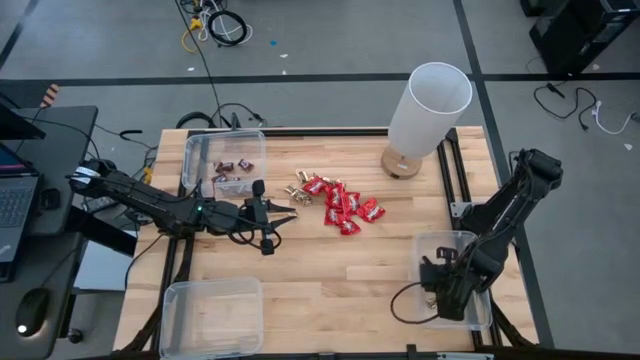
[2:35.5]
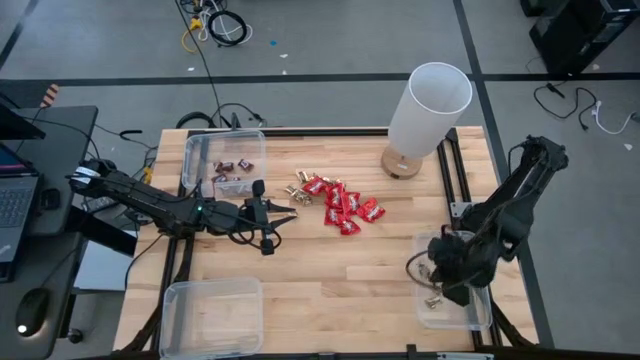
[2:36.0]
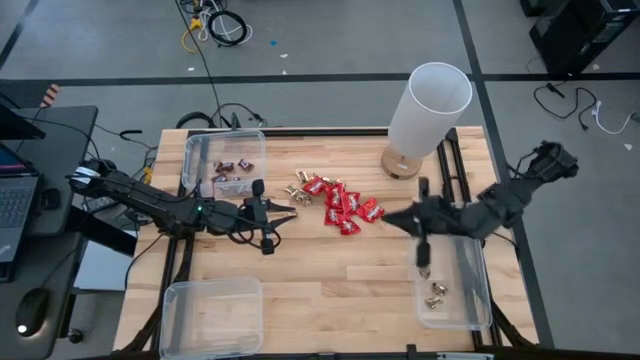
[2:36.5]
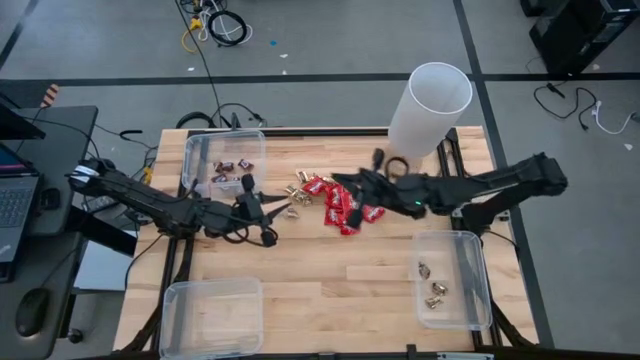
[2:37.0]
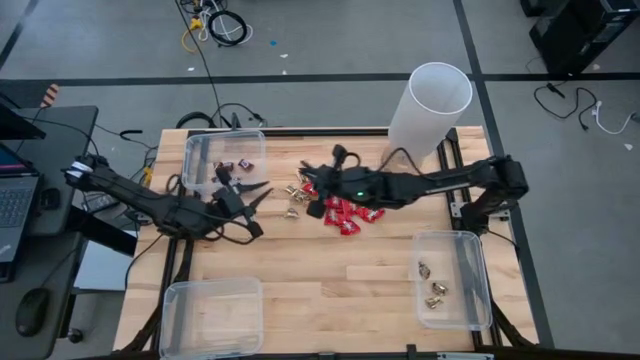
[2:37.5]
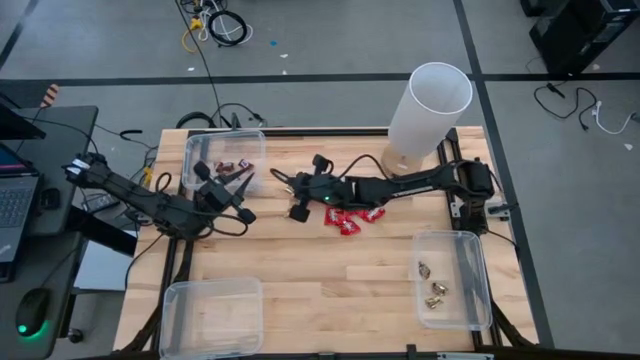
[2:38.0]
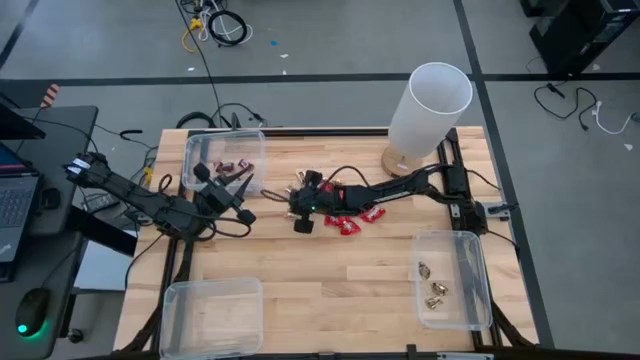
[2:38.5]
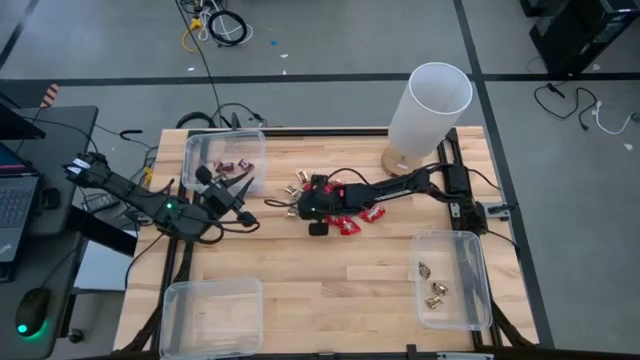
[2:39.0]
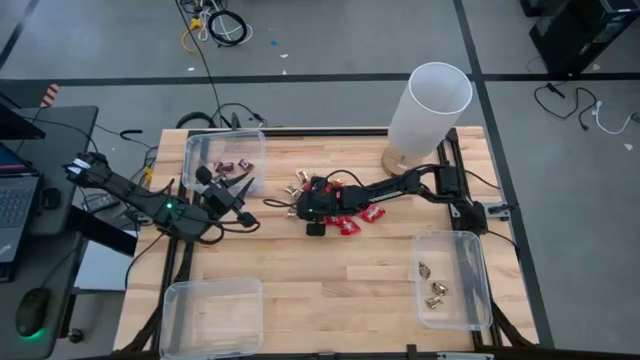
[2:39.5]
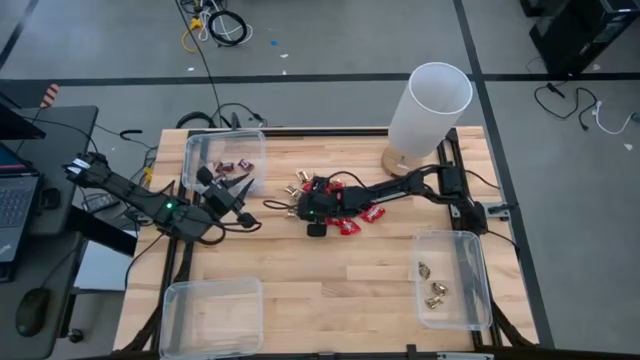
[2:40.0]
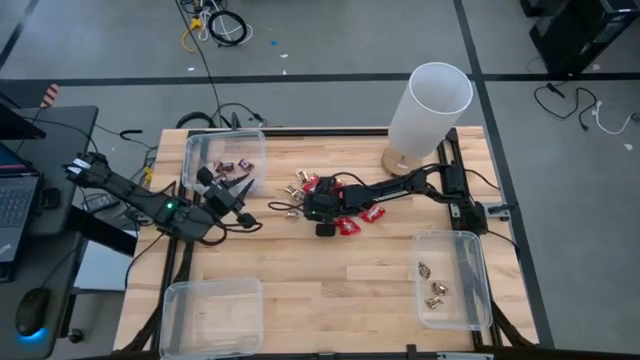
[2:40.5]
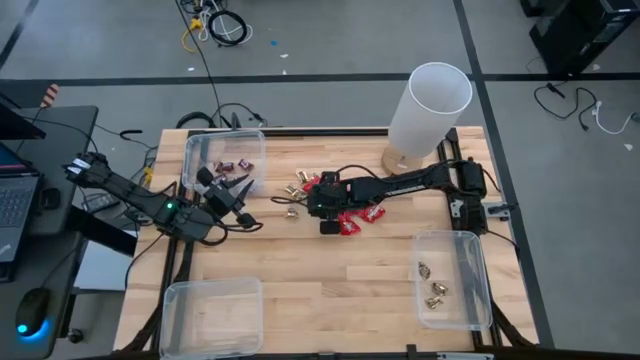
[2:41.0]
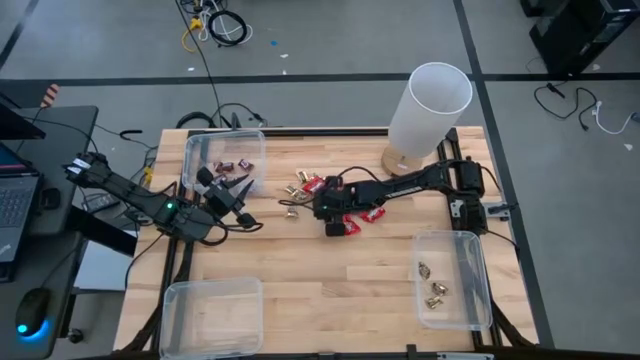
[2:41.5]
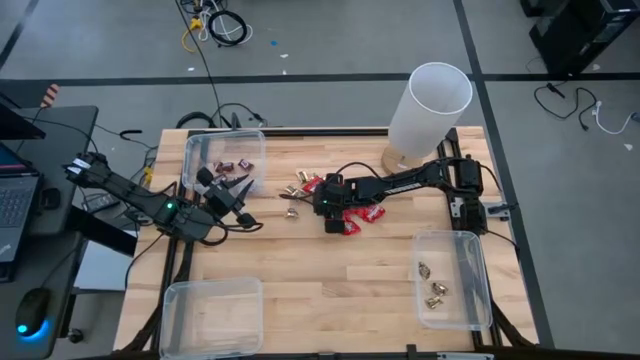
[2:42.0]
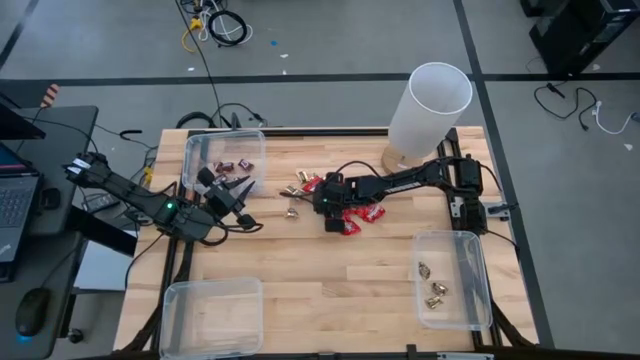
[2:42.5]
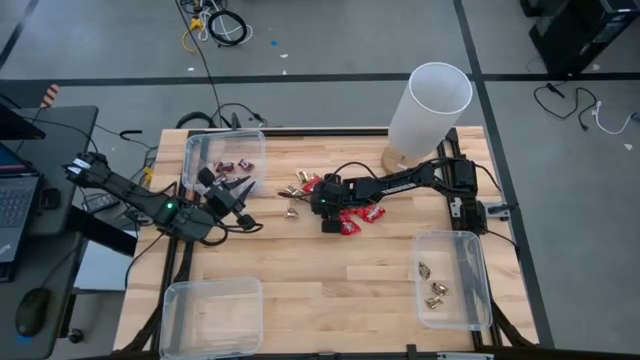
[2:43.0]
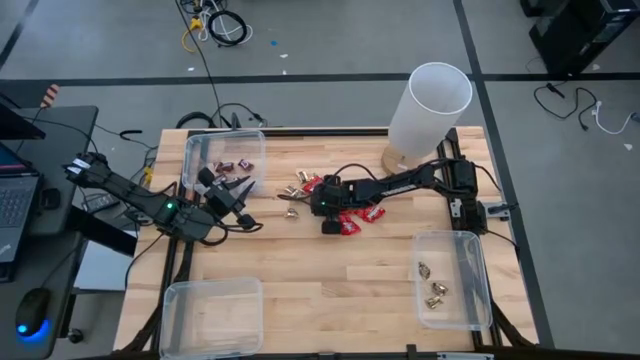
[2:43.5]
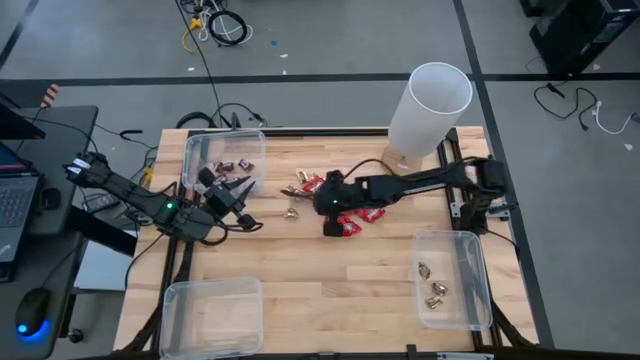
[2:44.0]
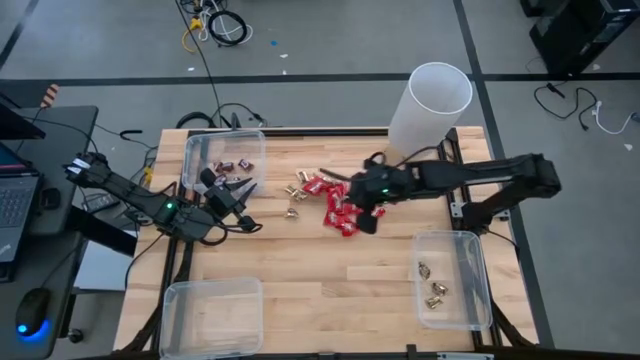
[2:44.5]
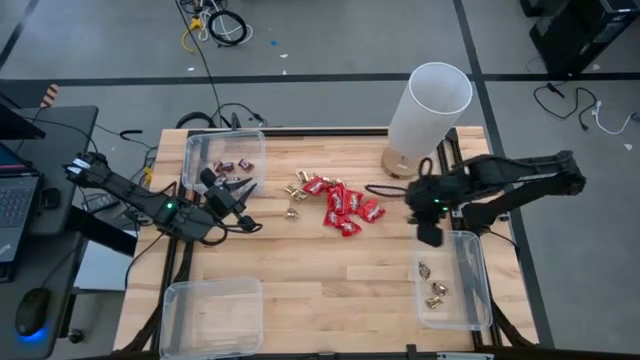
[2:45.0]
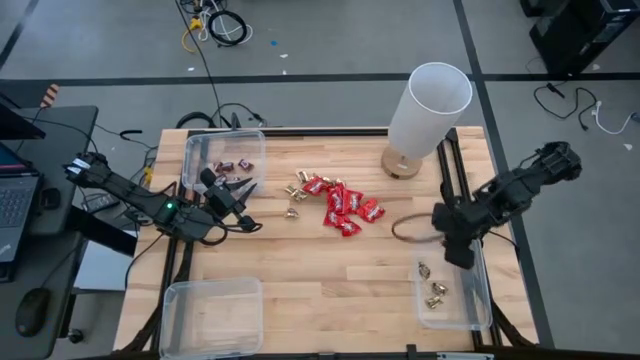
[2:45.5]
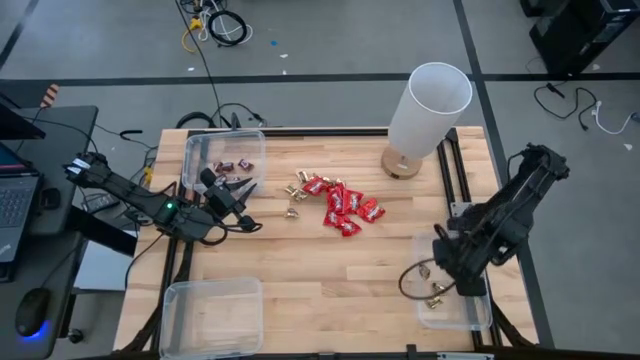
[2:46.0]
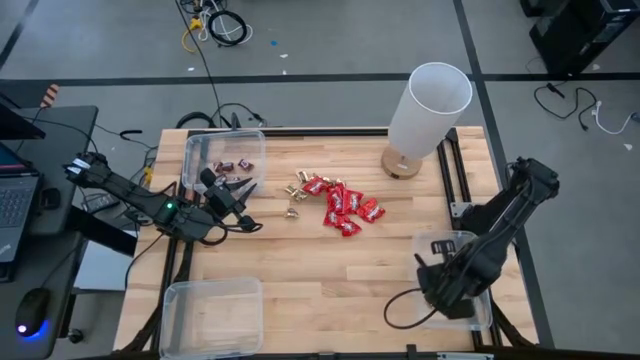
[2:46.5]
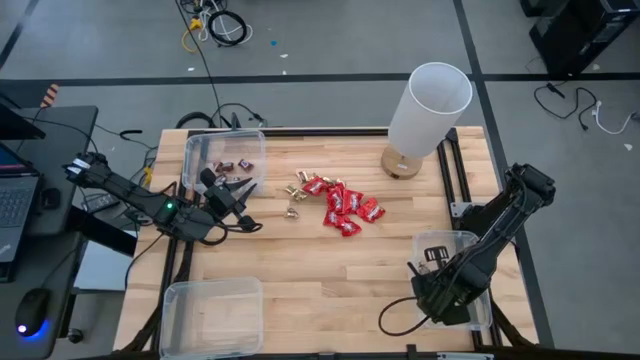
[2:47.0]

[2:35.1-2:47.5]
Task: Sort candy
Put the gold chocolate into the bottom right transparent bin

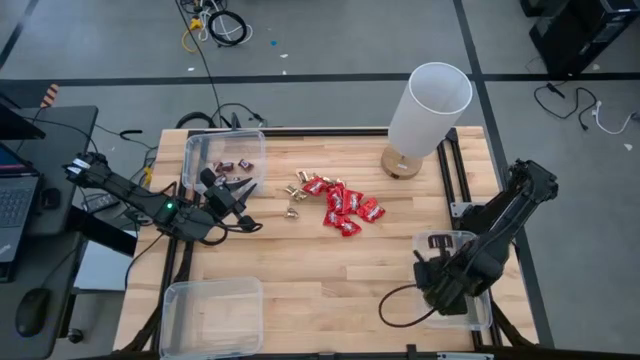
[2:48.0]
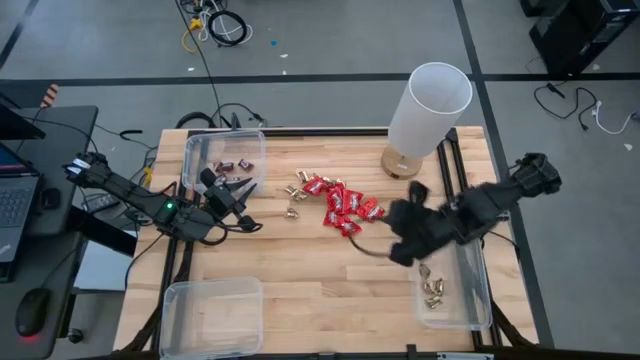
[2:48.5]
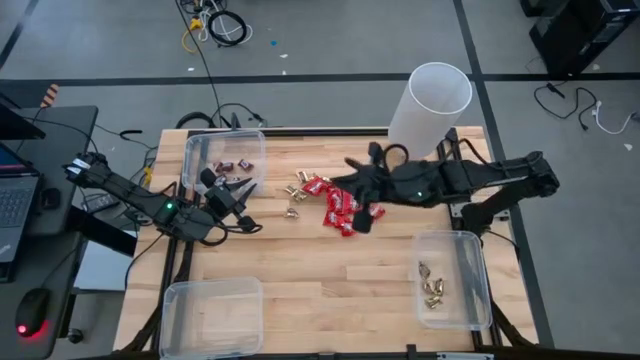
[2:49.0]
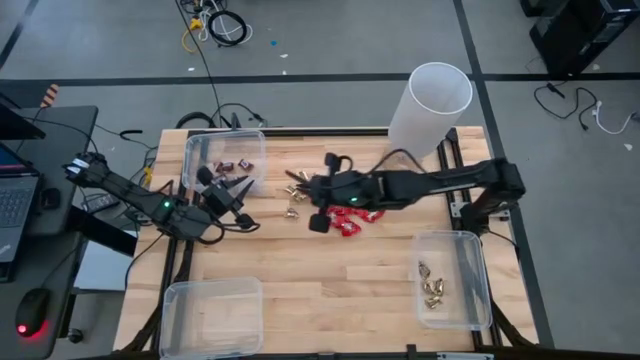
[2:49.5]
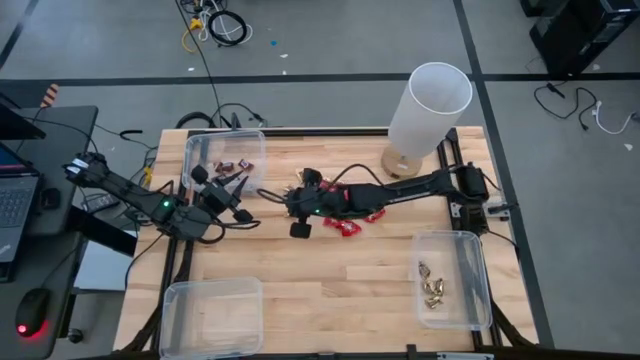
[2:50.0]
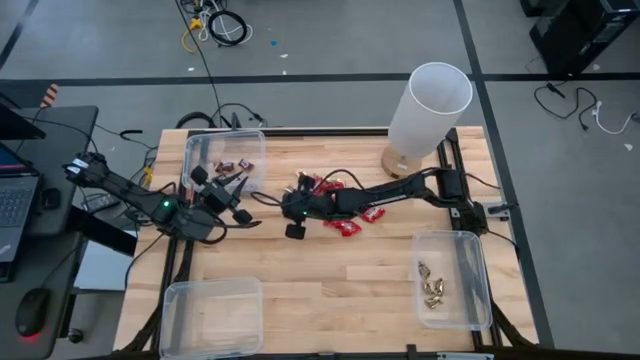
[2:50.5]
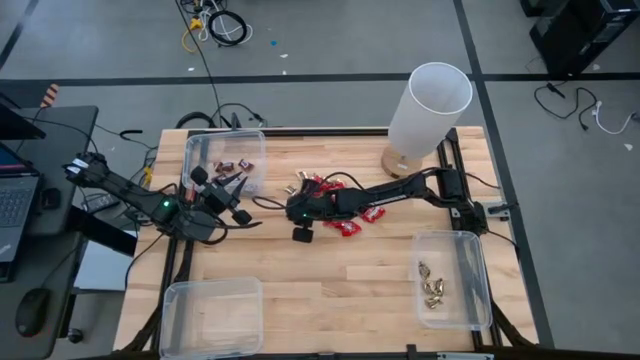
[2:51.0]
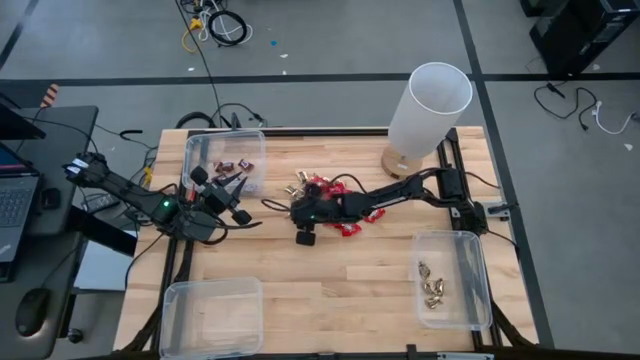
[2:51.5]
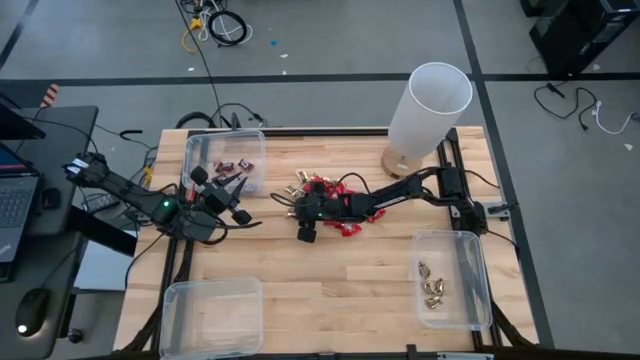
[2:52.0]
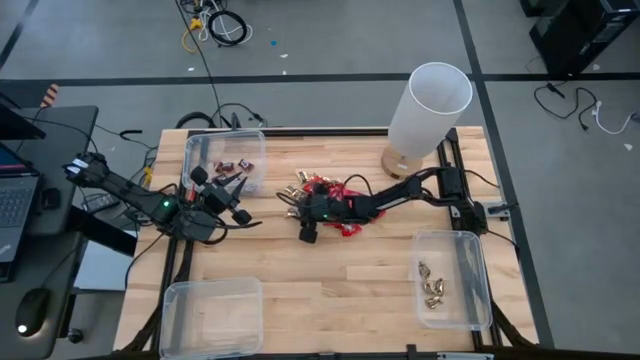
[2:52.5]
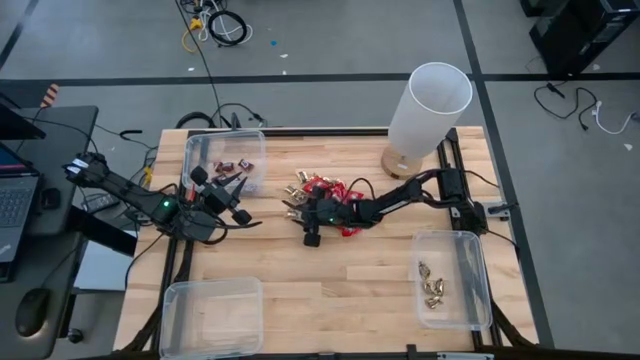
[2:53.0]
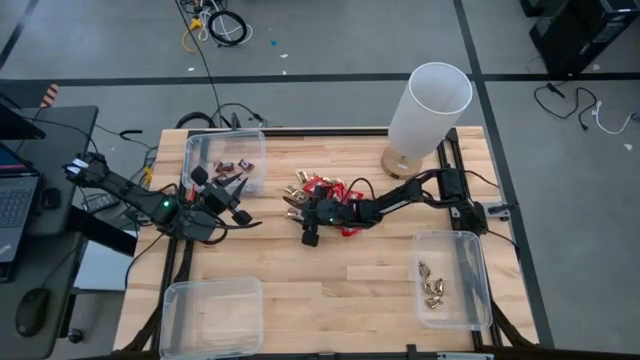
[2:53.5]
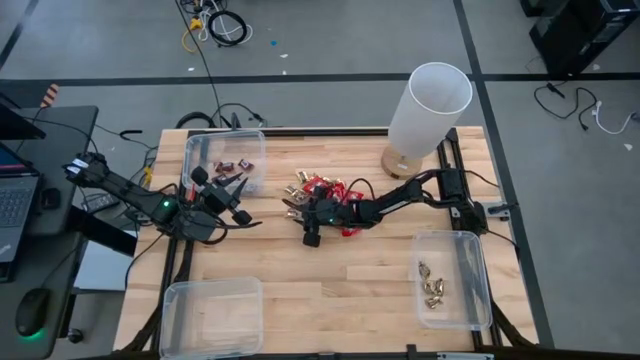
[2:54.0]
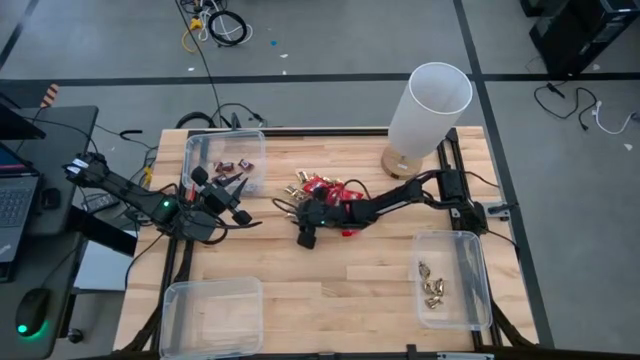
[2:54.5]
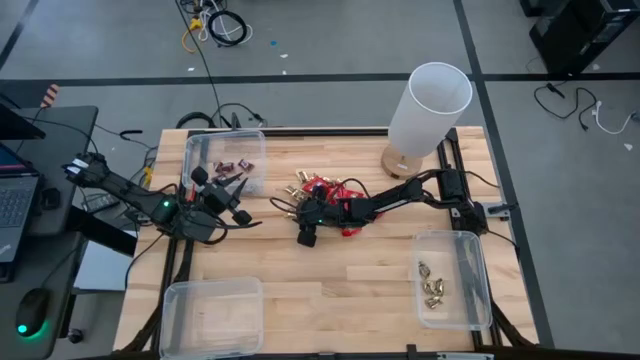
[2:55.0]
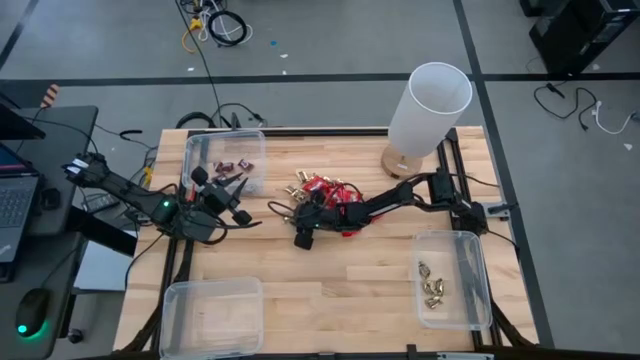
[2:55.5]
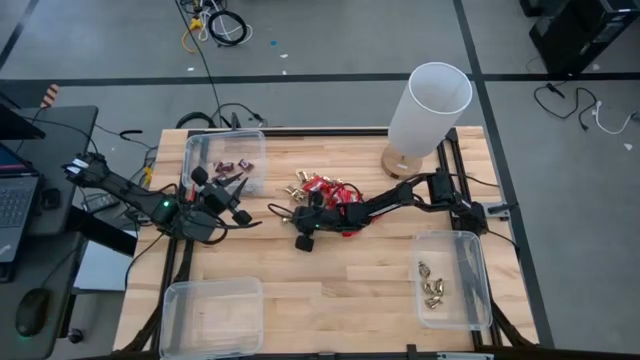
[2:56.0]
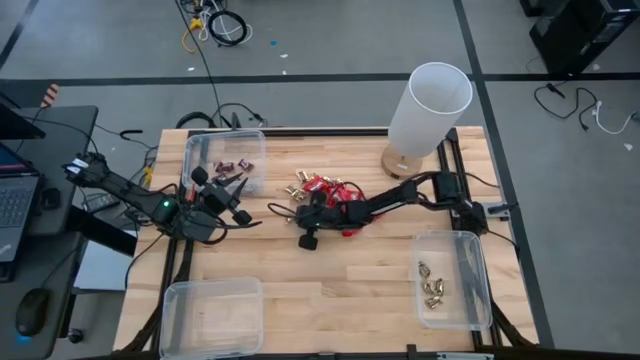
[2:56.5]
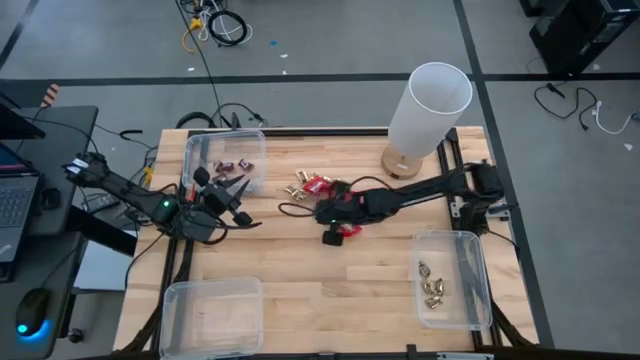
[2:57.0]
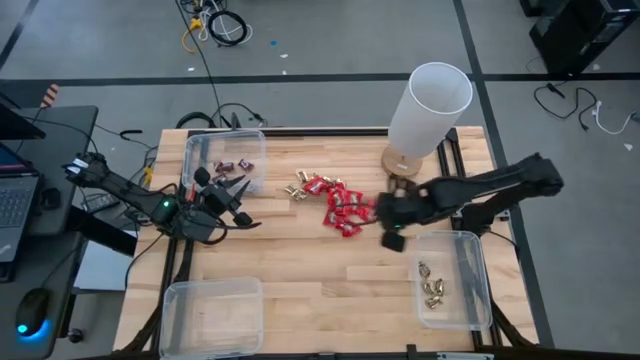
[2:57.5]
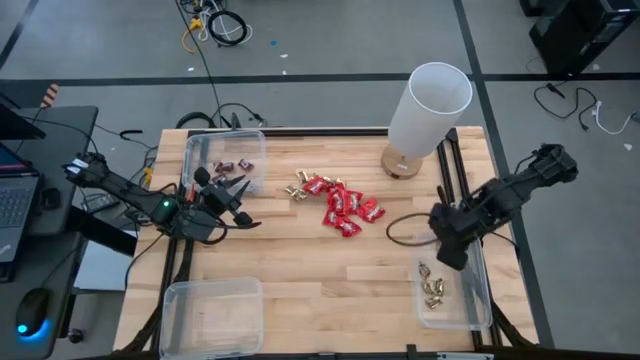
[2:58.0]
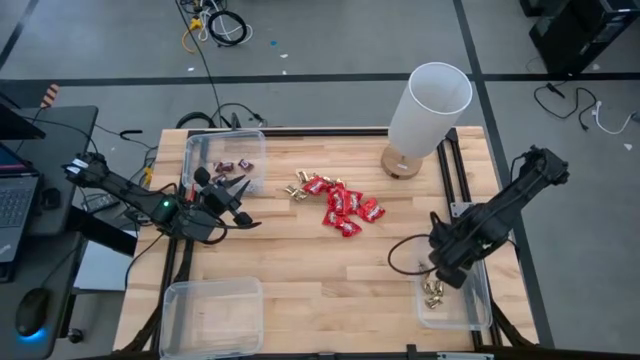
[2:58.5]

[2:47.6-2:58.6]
Put the gold chocolate into the bottom right transparent bin
